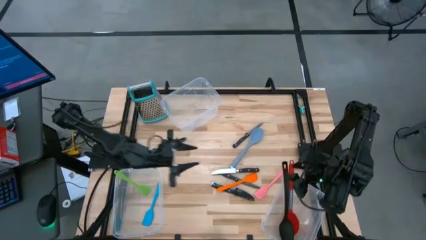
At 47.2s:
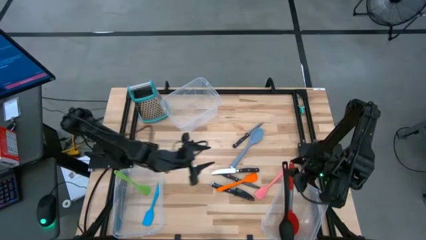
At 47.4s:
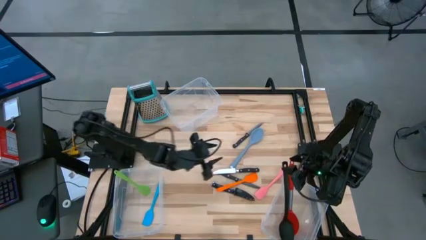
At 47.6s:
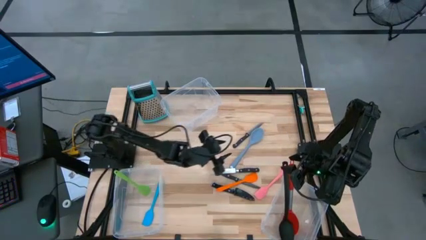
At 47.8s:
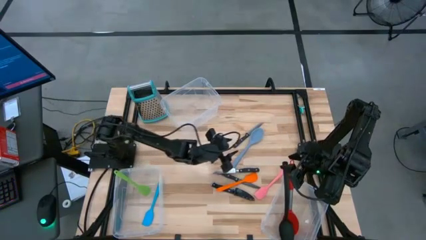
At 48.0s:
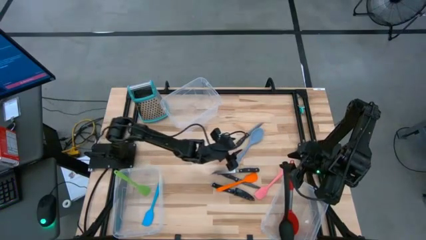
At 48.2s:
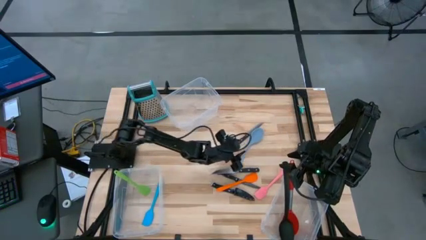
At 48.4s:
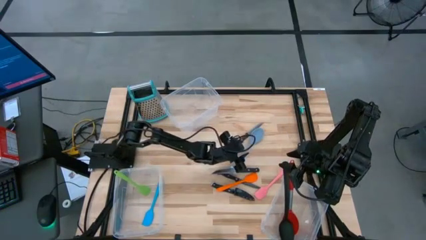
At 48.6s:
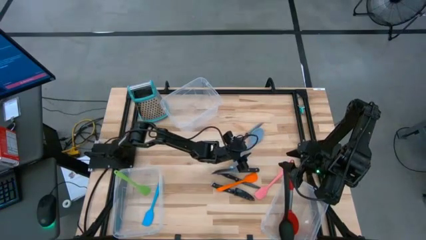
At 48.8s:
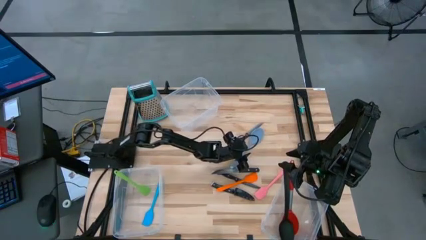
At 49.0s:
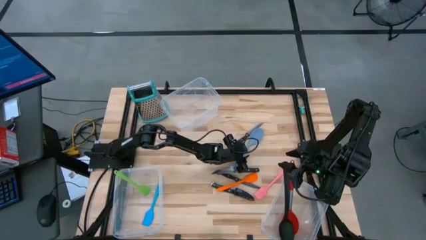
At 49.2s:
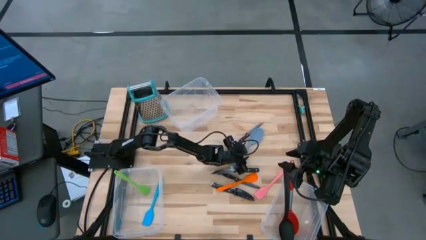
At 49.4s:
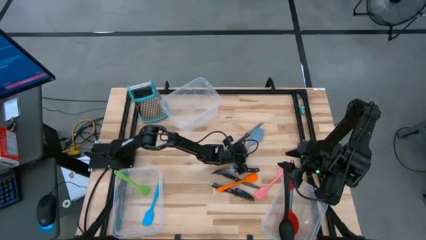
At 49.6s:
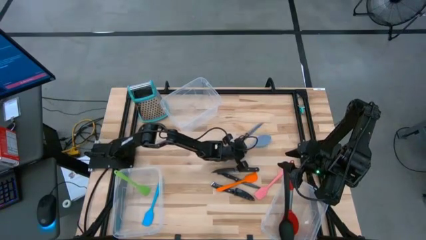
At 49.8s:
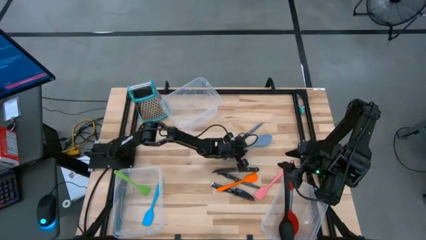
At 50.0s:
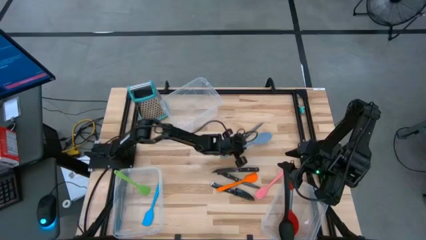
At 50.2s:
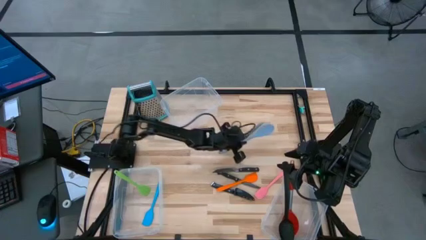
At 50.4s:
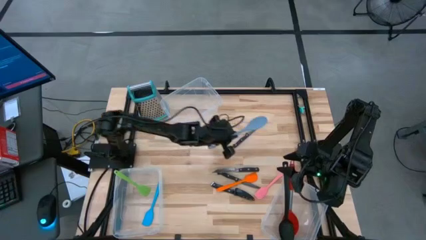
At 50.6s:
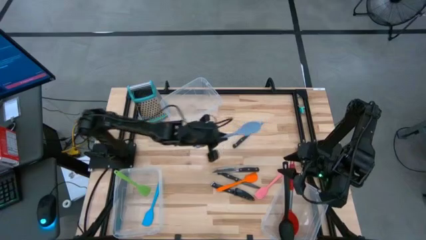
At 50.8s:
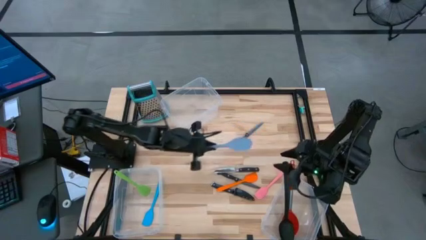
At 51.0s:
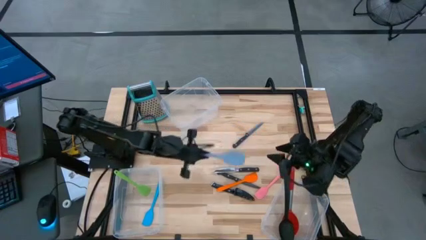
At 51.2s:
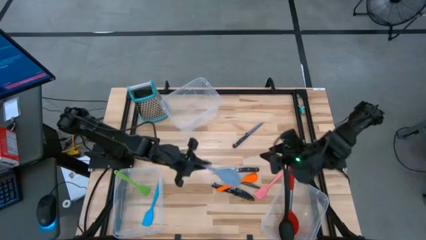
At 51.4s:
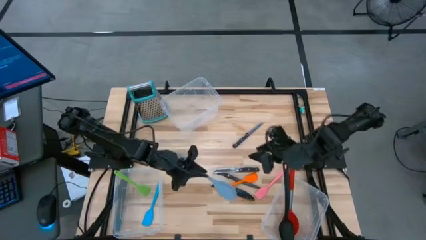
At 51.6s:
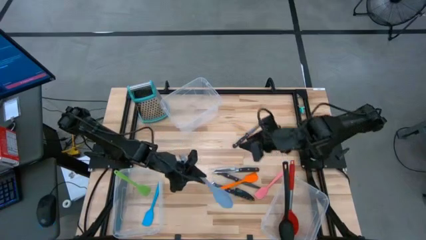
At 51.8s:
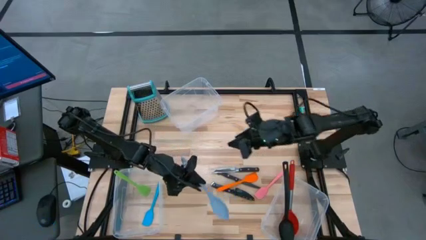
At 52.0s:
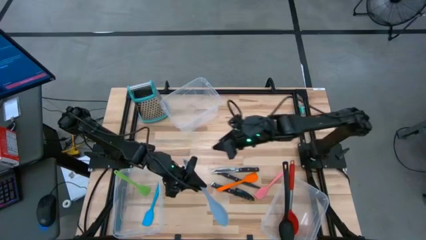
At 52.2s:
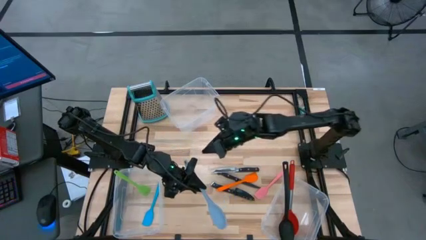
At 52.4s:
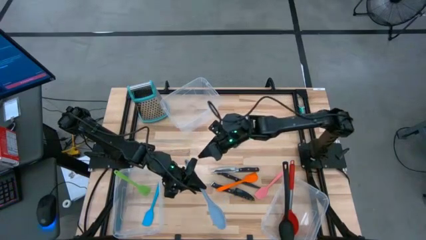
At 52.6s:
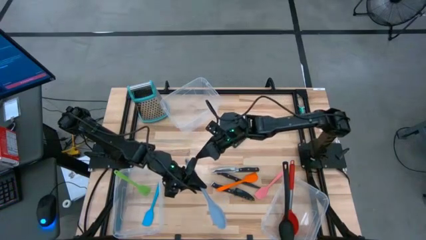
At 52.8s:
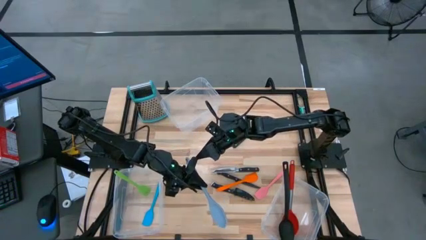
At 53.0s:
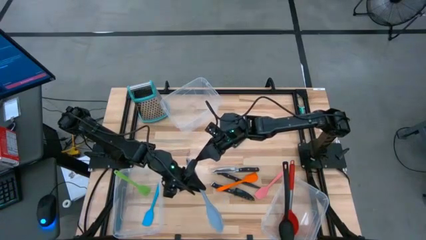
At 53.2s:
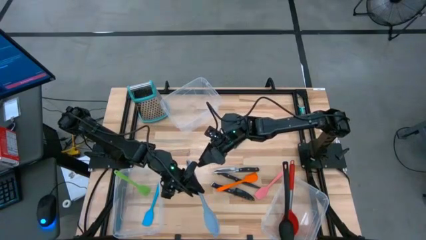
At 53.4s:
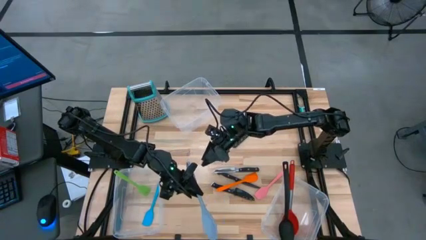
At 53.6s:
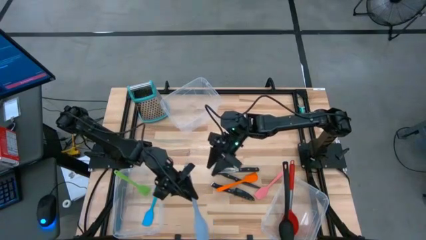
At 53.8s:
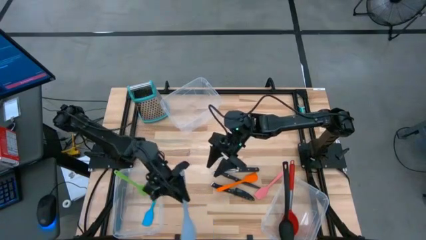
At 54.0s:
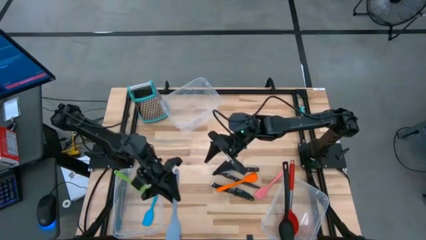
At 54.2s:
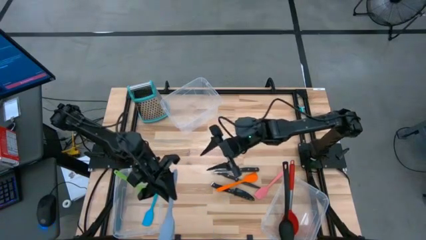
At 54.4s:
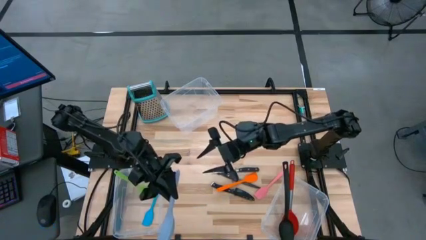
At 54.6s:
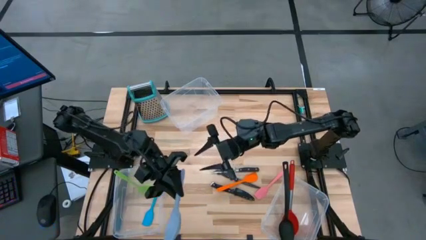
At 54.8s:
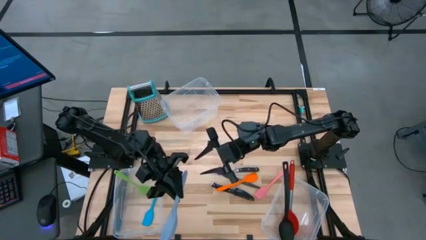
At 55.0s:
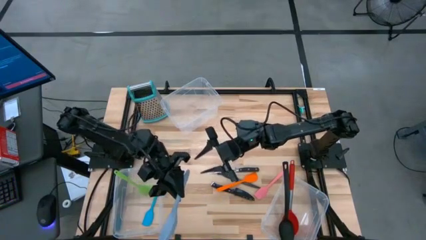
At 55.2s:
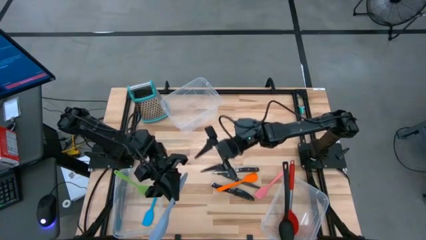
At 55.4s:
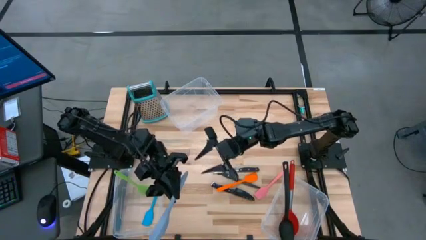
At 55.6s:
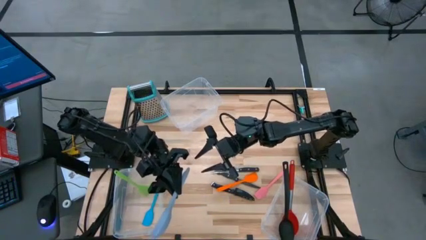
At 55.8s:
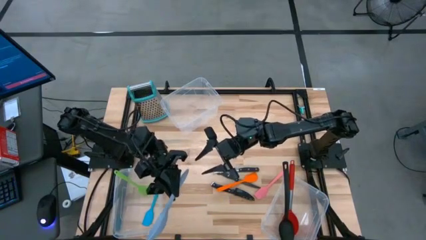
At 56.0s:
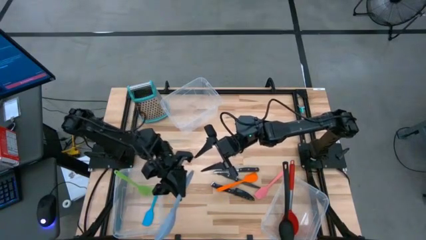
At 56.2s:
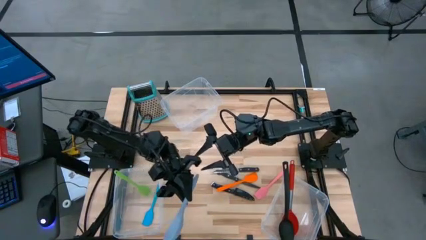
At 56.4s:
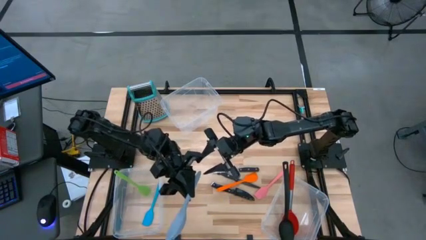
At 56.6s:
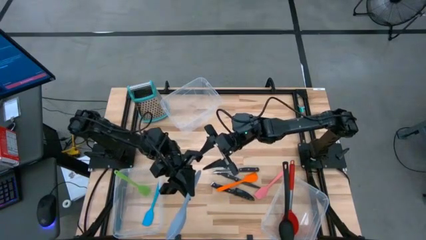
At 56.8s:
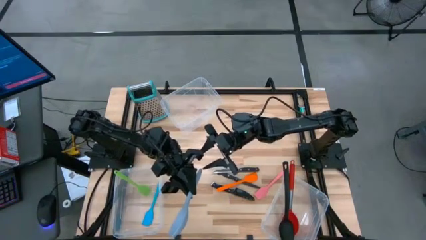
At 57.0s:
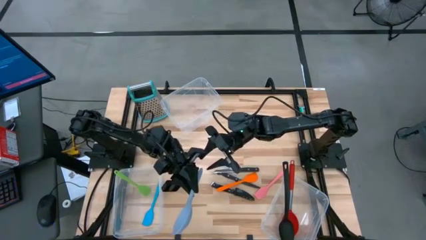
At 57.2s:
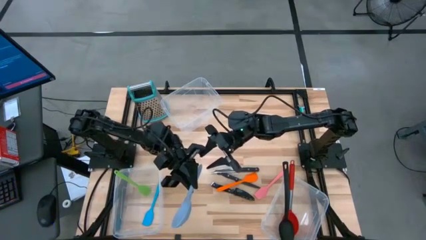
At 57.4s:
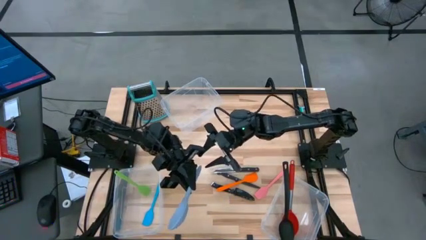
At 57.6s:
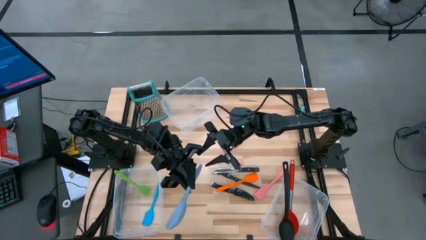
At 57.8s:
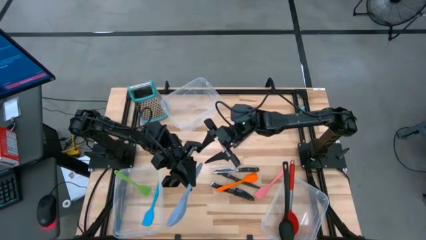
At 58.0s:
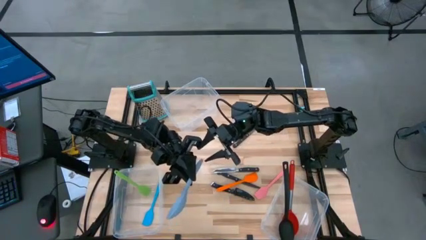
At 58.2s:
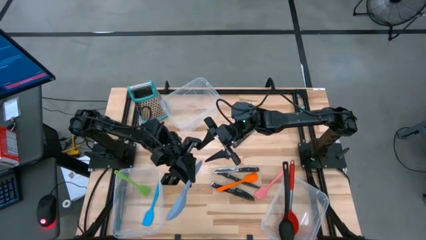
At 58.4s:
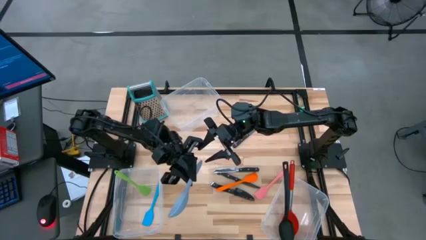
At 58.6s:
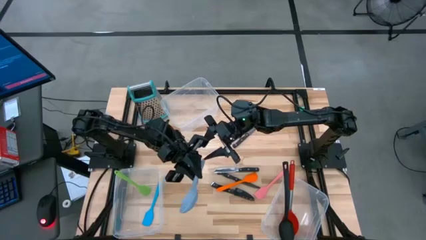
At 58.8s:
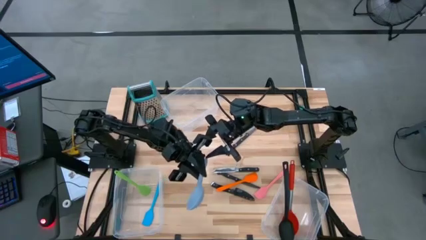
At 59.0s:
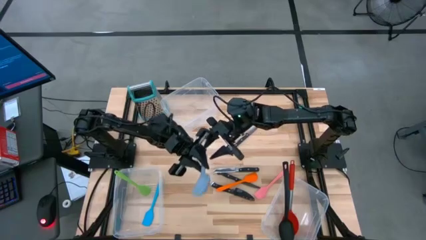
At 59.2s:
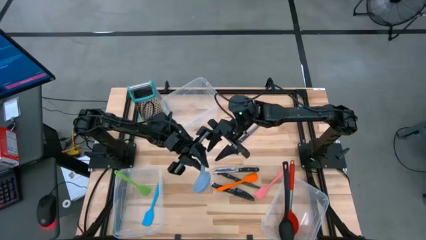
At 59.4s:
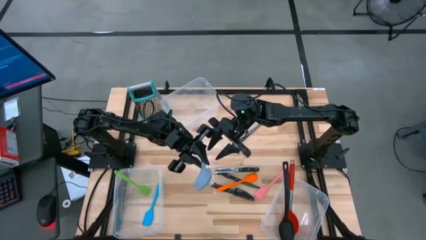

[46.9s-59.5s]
Task: Pick & Place Kitchen Items
Put the gray serving spoon into the bottom right transparent bin

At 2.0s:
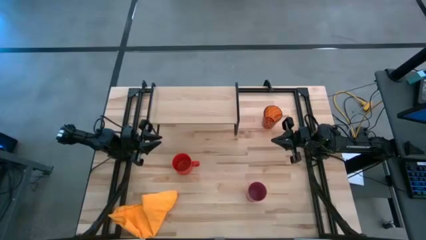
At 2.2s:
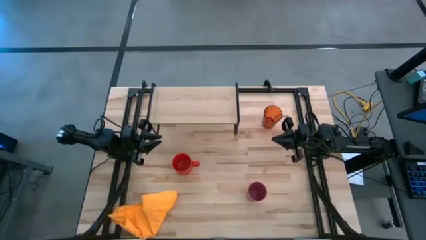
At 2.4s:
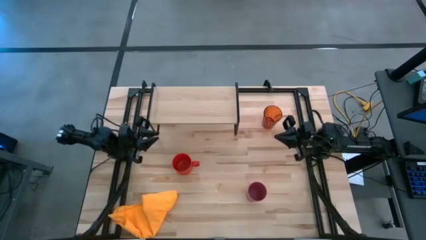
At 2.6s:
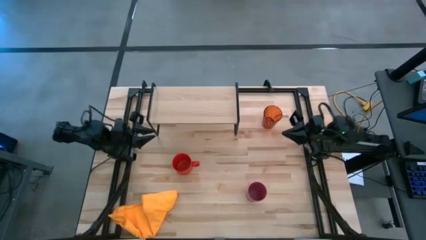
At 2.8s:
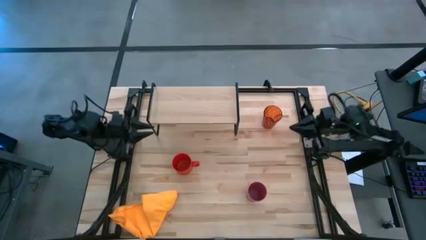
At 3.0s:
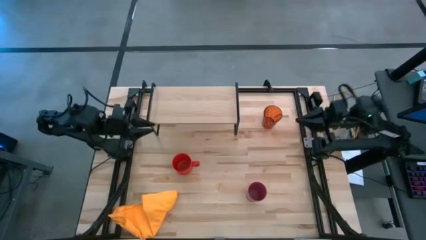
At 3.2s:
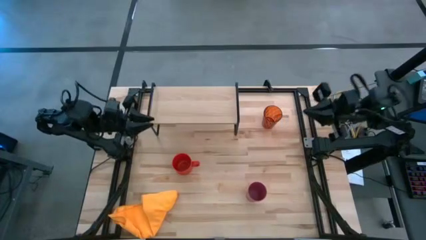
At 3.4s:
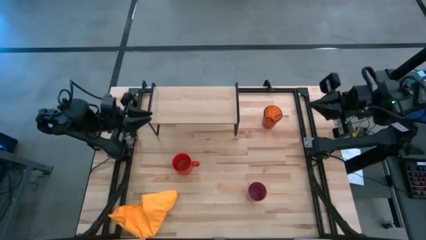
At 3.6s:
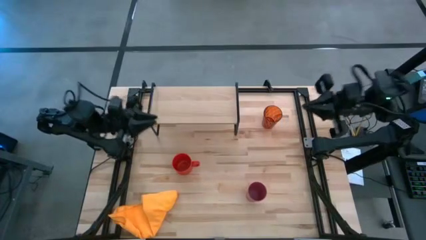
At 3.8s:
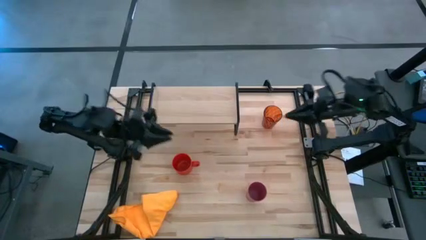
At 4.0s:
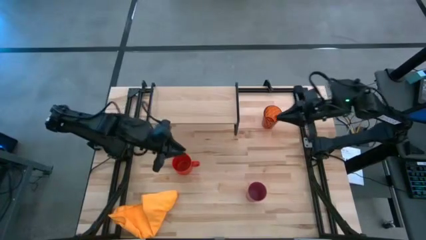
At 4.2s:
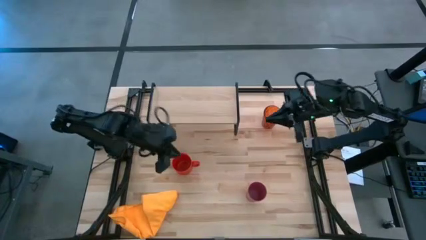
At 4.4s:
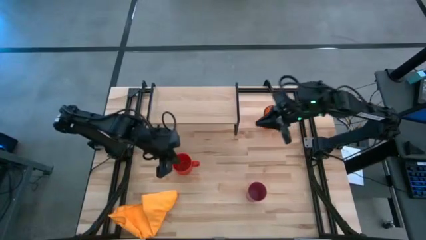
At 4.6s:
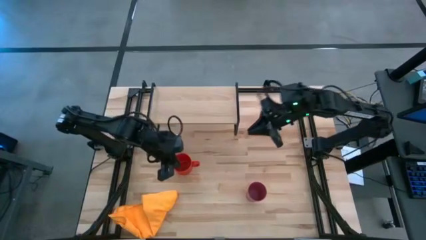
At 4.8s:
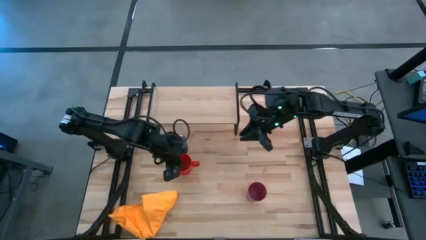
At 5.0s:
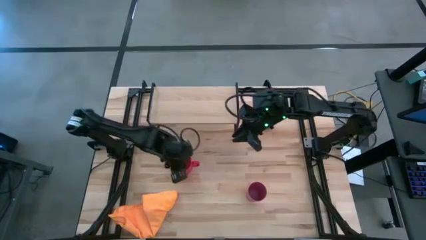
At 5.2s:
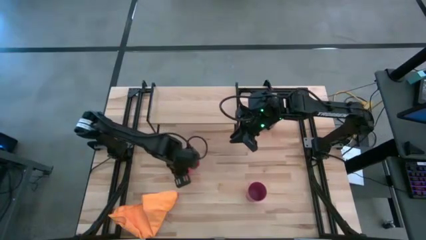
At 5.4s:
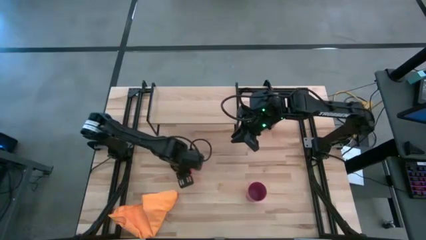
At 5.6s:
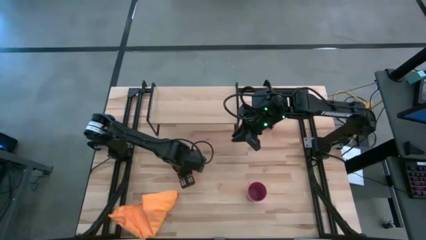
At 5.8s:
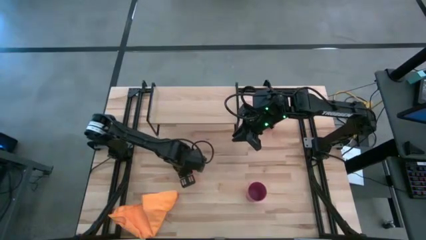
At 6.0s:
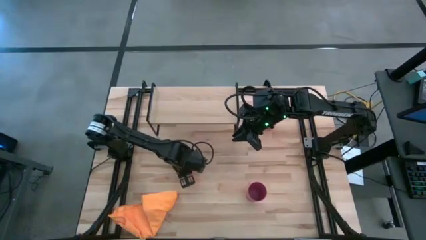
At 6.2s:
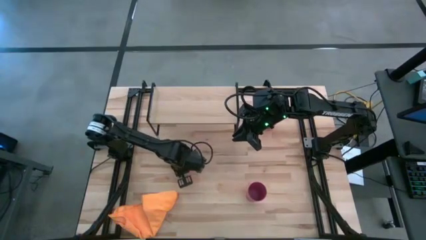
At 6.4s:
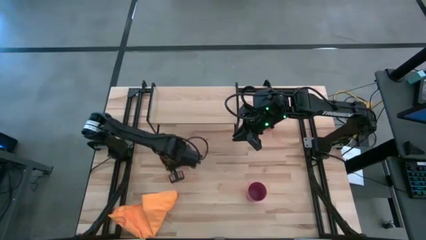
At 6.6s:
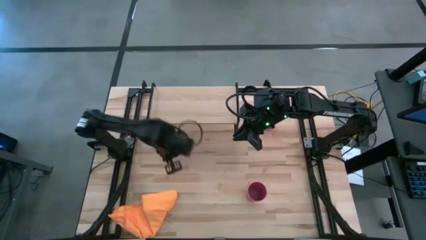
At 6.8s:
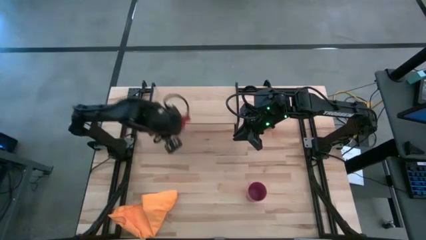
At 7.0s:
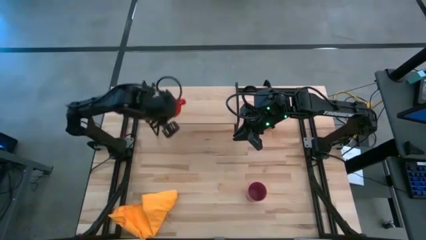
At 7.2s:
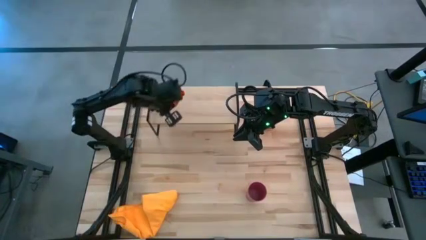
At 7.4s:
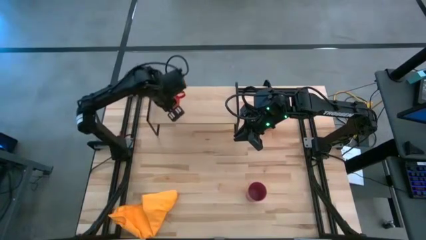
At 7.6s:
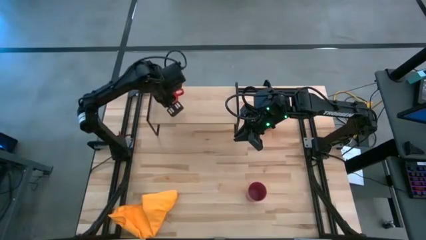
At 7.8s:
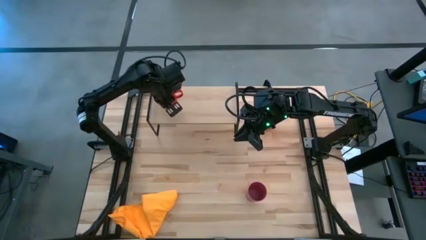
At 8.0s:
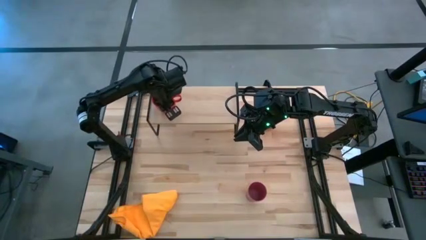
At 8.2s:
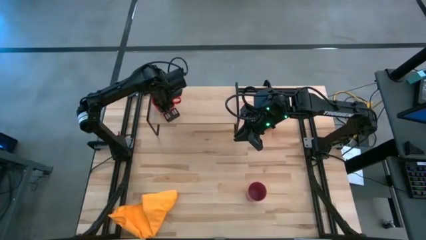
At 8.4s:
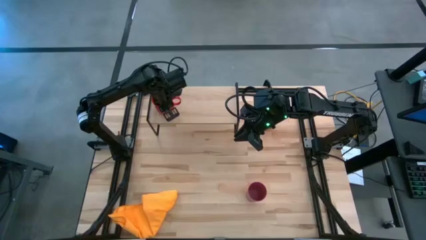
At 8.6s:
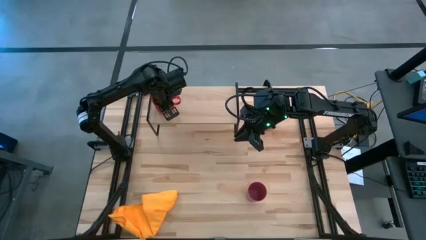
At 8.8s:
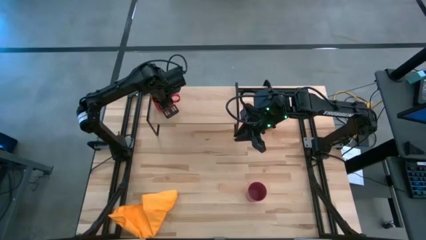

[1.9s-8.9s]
Task: Stack small to large cups/mugs on shelf
Put the red cup on the shelf
